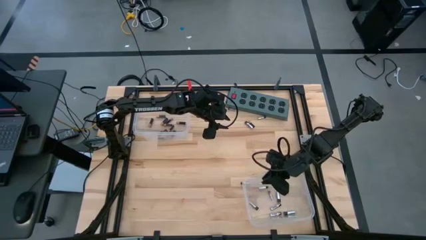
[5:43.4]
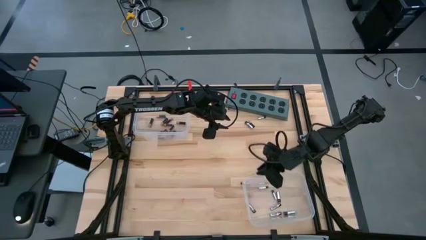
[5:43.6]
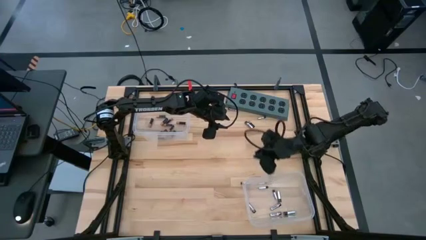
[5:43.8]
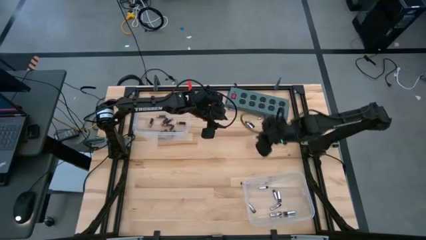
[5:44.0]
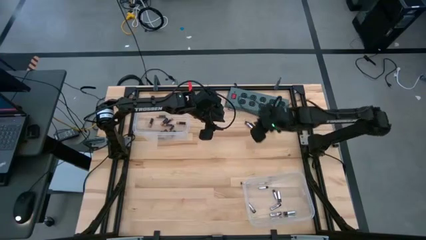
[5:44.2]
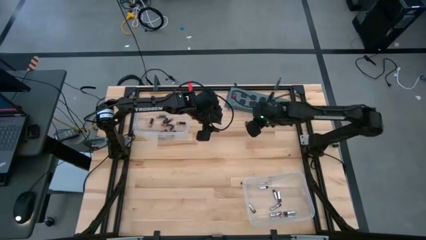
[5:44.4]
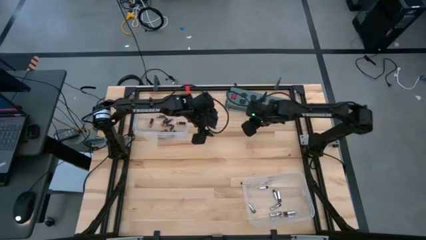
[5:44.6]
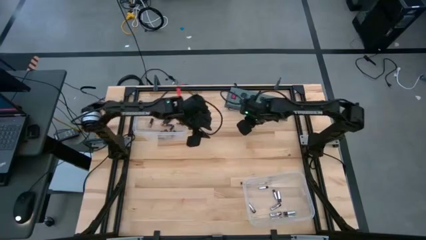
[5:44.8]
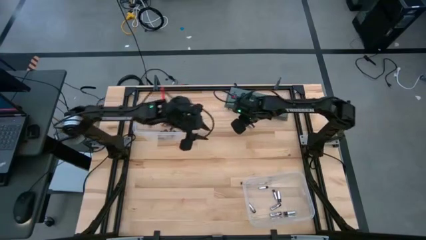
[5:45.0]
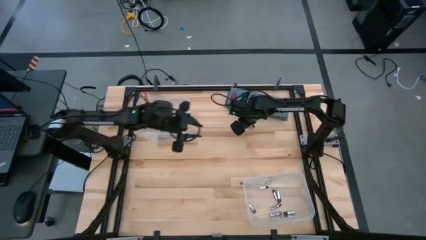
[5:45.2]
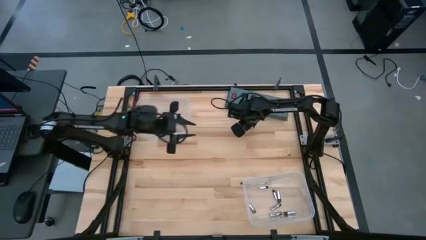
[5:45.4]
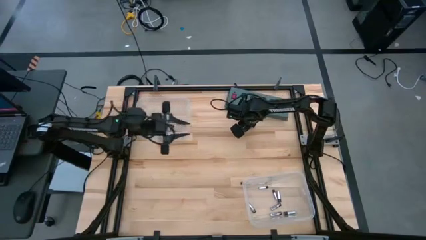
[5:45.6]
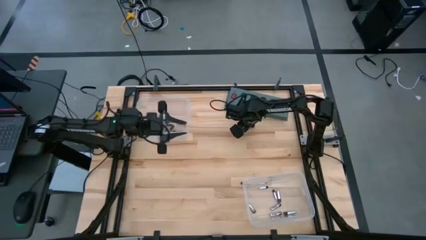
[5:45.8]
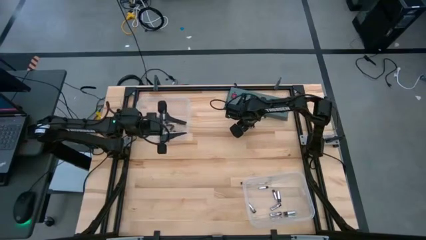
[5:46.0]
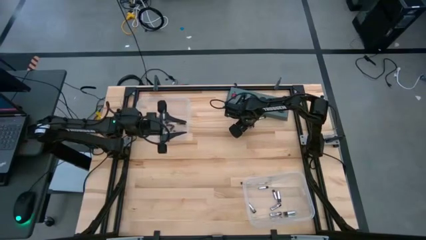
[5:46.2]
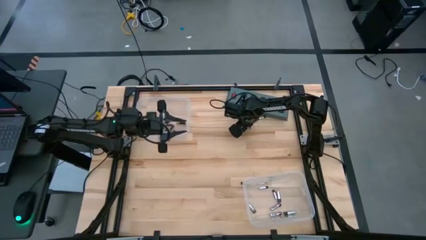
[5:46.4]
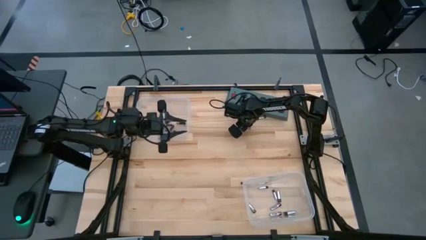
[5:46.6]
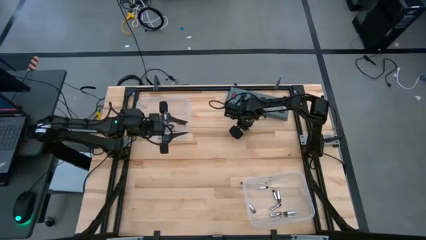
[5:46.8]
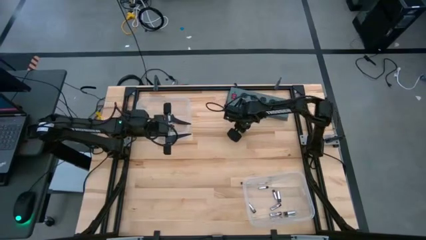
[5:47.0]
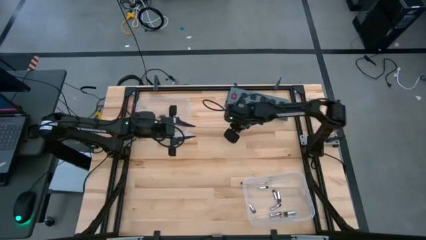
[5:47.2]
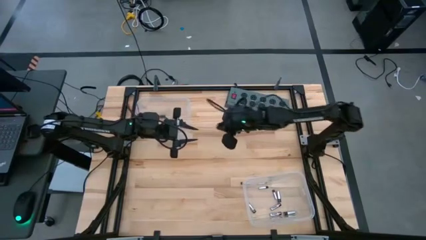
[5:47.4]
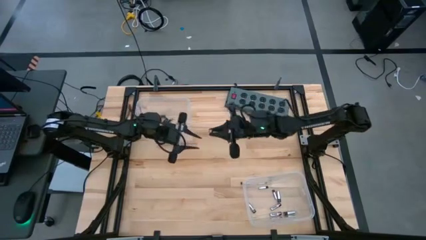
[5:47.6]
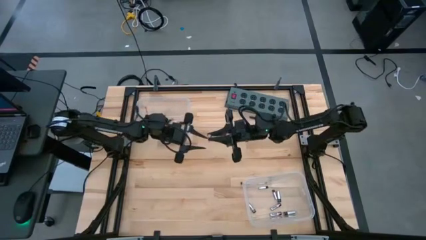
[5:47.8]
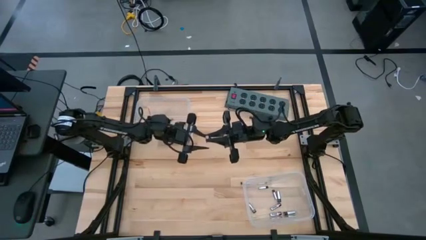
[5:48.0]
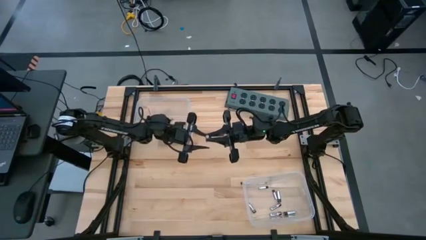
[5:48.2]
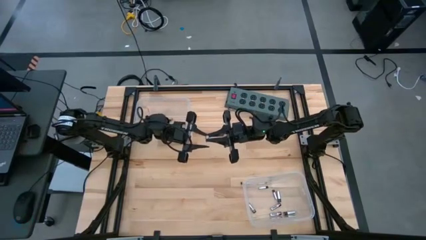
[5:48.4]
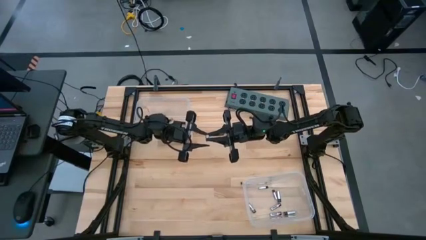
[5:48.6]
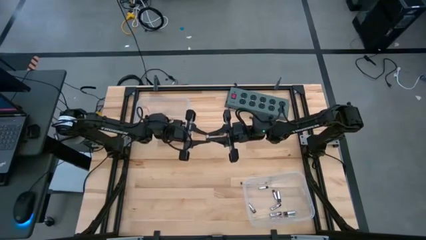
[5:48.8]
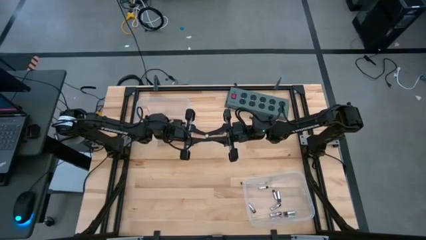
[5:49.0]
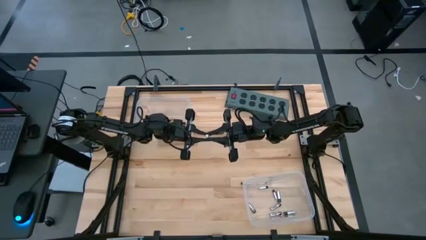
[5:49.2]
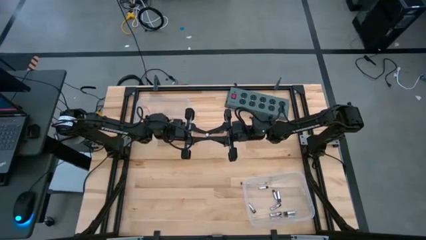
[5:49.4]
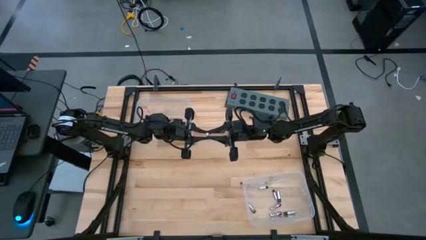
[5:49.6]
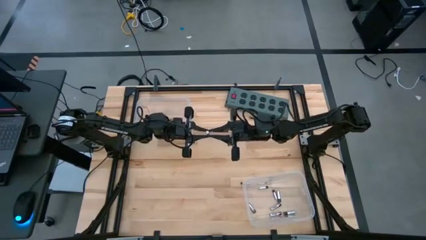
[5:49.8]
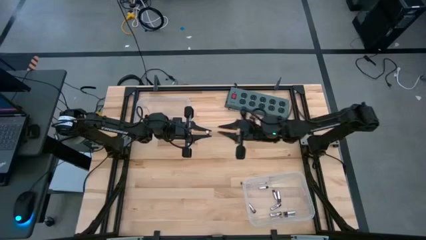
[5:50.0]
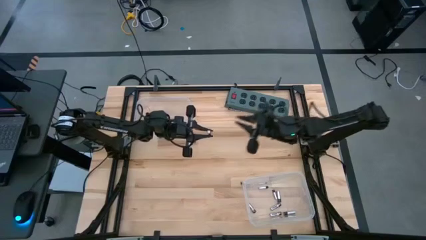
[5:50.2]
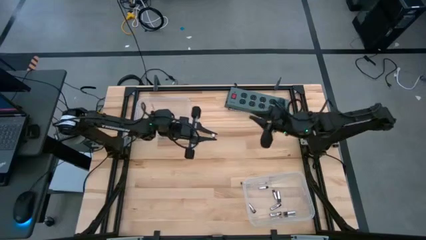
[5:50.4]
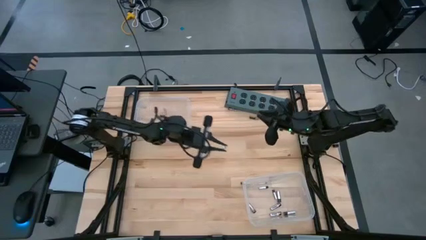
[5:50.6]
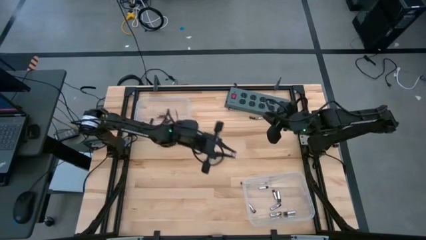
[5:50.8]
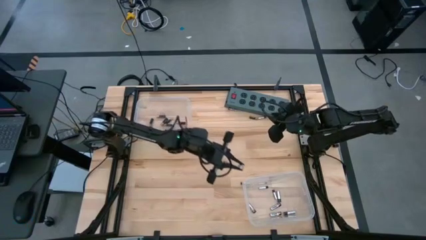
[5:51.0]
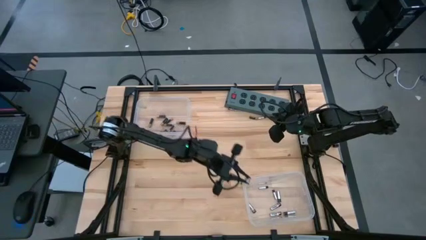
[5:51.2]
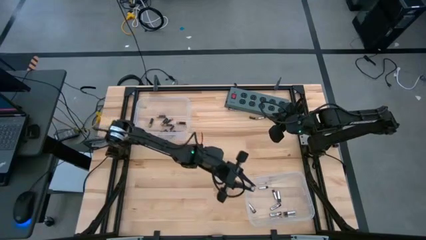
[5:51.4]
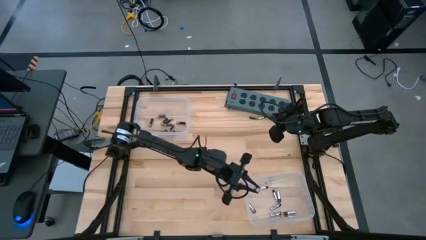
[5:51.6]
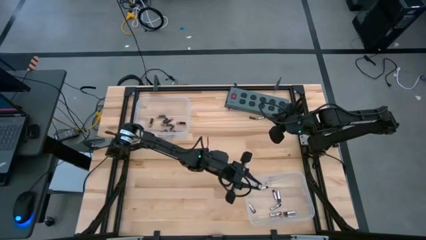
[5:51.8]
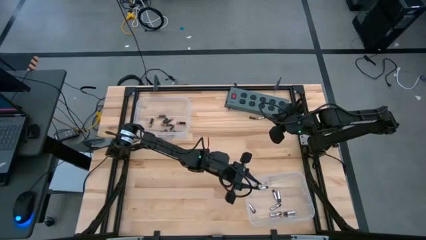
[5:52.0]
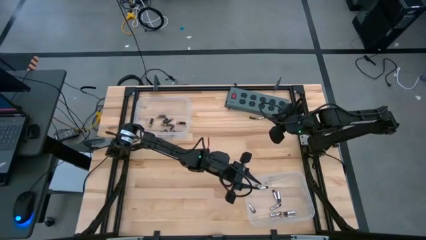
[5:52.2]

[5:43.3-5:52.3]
Task: Sort batteries
Put the silver battery into the bottom transparent bin

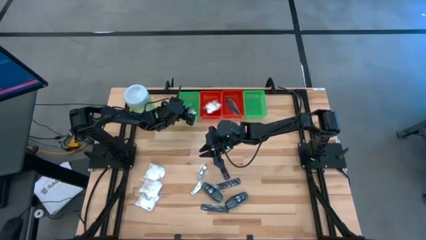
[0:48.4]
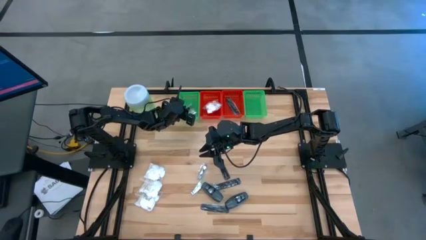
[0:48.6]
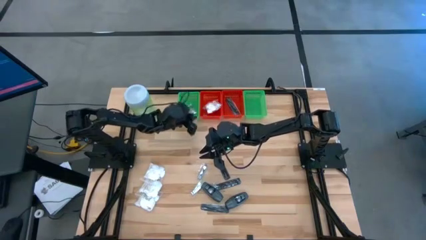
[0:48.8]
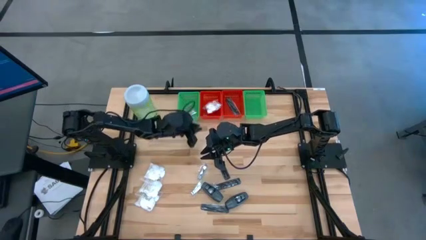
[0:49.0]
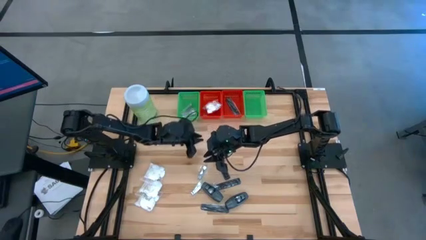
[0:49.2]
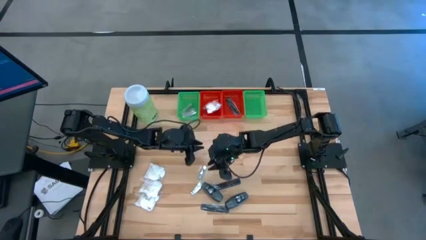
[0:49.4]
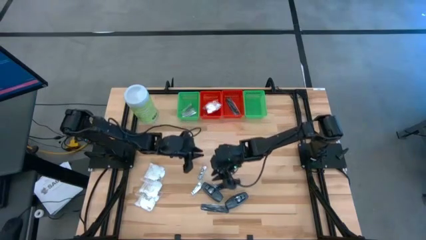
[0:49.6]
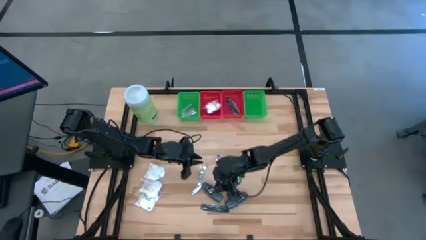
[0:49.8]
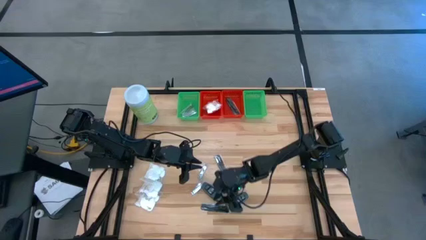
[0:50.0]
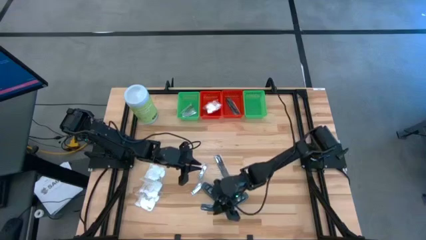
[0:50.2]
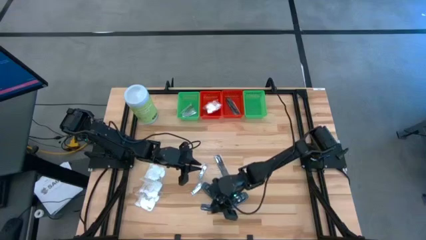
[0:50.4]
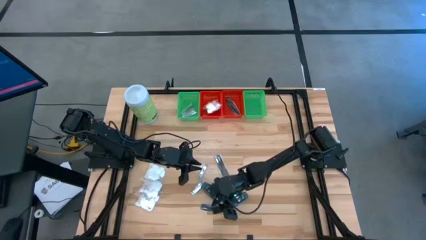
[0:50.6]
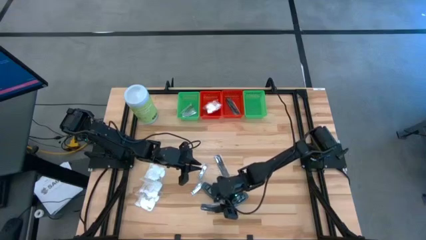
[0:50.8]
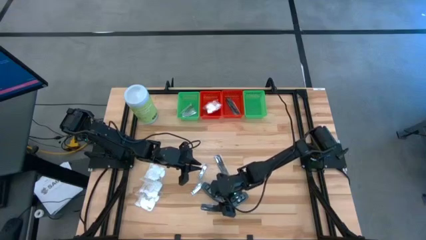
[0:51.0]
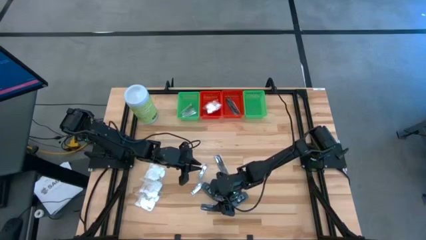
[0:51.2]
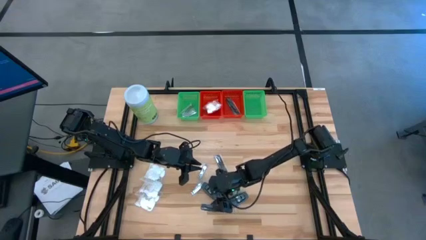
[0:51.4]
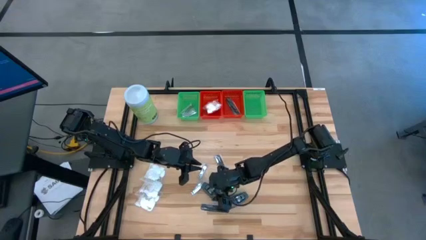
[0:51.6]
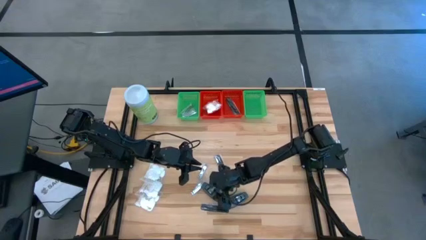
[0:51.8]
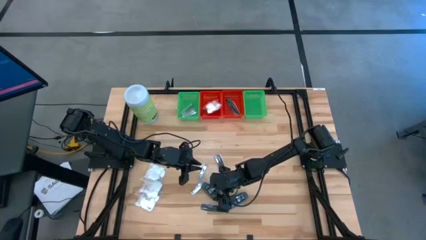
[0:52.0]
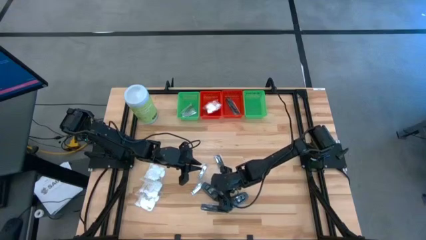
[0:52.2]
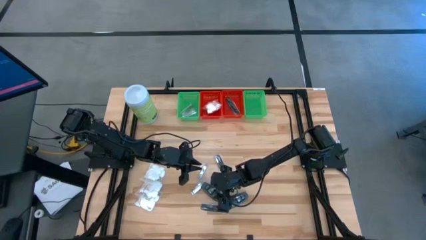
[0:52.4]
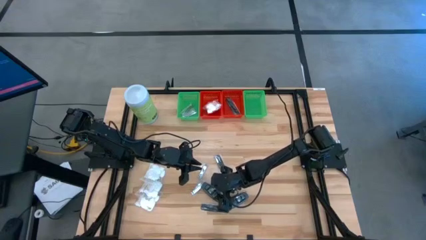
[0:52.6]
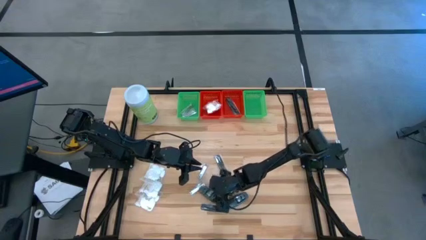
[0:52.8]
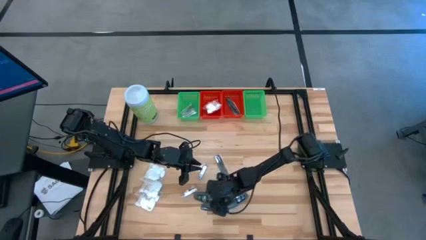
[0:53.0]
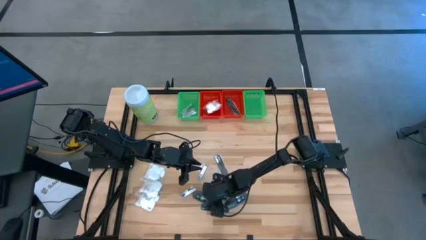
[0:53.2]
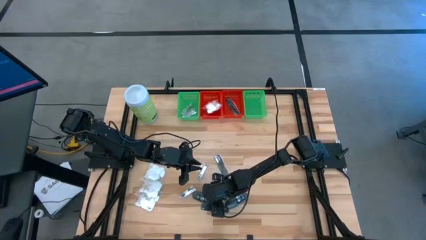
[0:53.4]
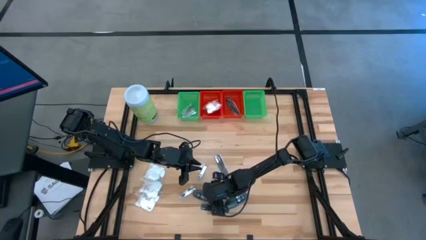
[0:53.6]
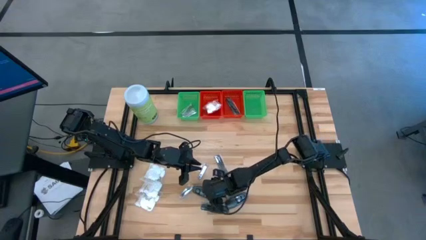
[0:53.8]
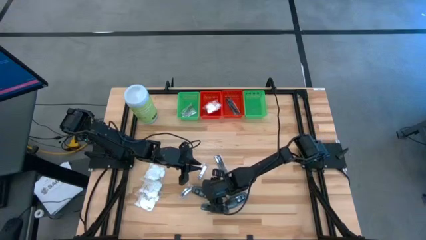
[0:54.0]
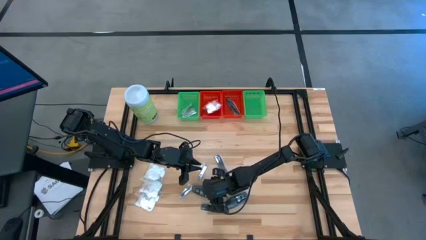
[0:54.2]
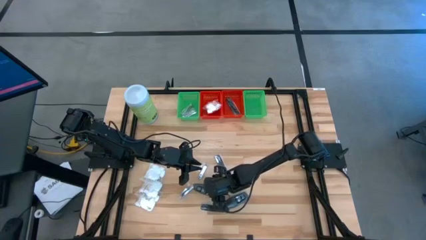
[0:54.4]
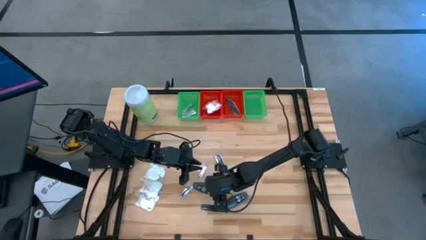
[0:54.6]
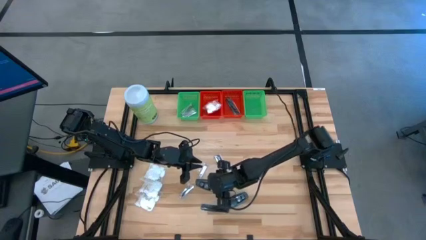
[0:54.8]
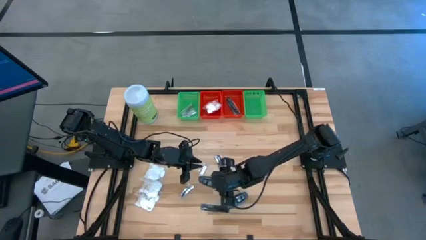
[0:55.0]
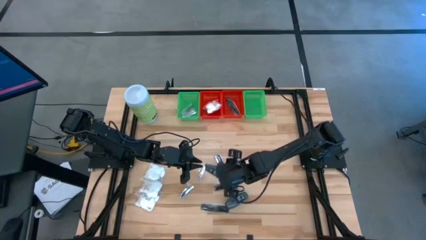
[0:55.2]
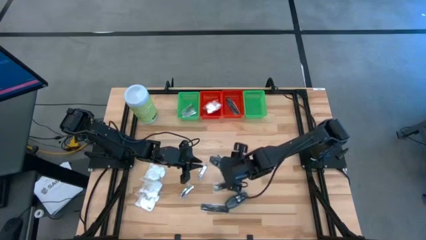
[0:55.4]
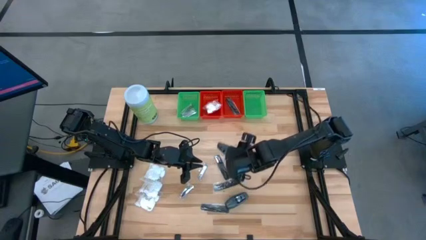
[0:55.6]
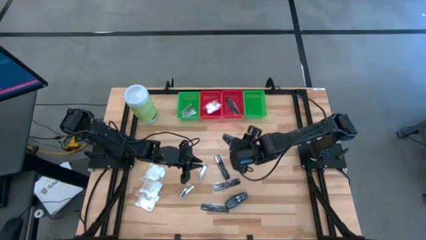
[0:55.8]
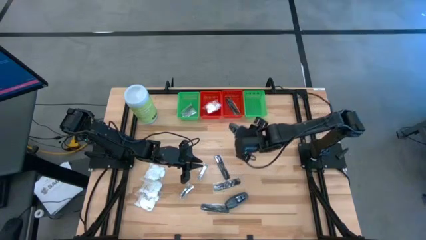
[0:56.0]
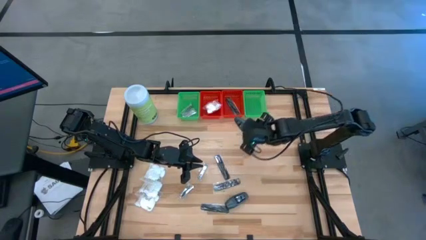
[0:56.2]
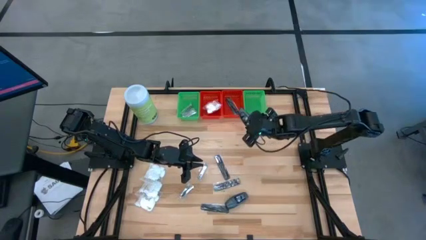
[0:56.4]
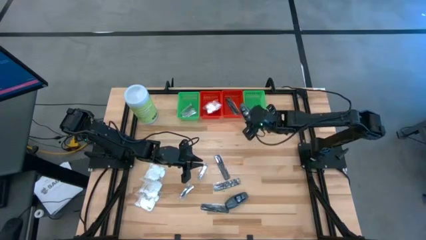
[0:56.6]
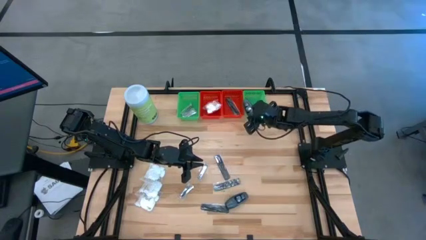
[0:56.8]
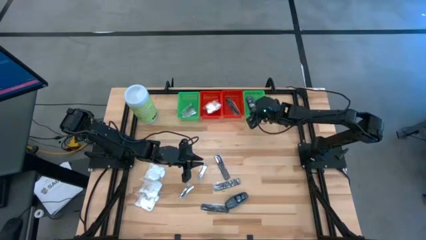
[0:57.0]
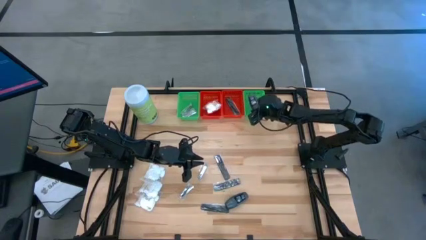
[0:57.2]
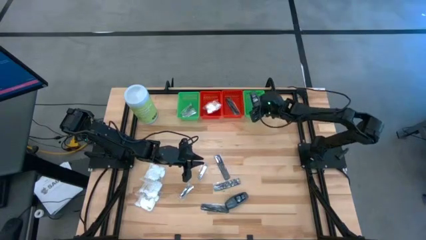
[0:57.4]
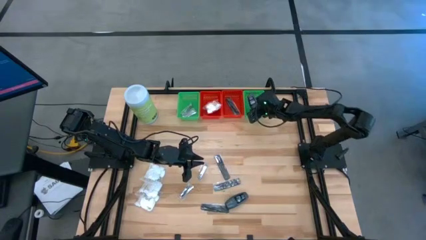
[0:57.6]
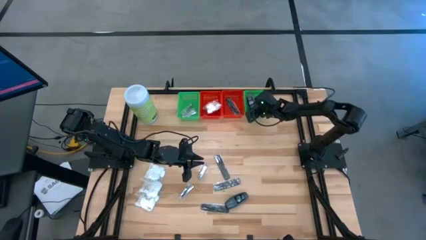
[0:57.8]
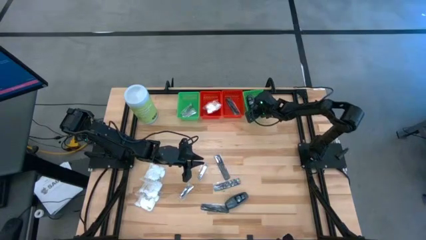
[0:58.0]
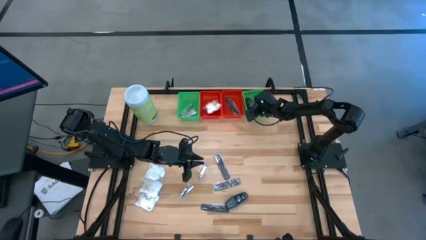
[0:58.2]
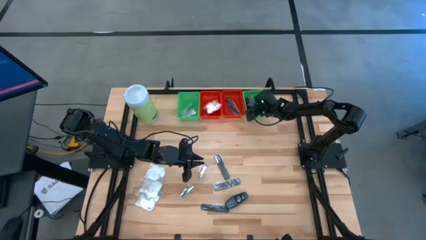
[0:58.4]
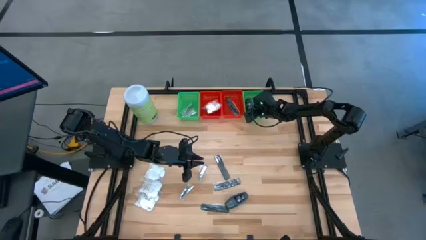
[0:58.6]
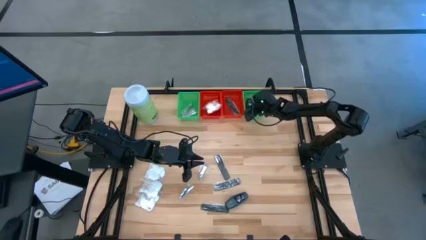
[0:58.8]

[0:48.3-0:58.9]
Task: Pick & Place Travel size toiletries
Put the black deodorant into the right green bin
